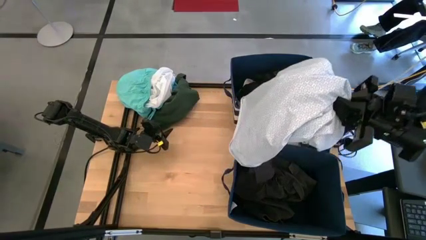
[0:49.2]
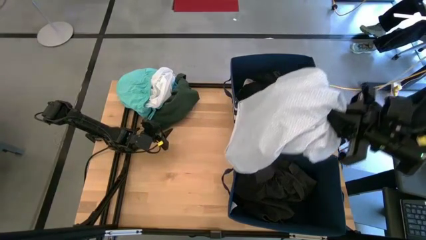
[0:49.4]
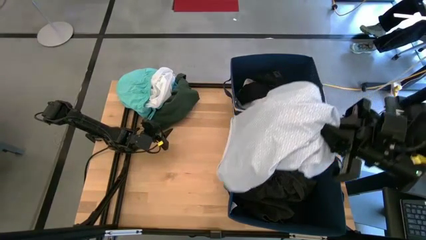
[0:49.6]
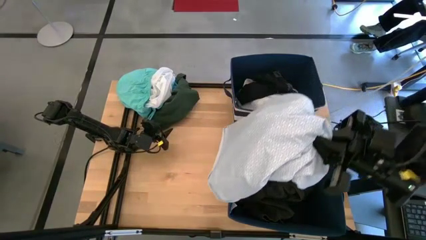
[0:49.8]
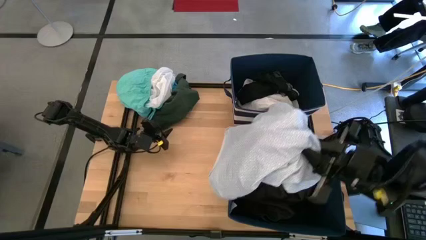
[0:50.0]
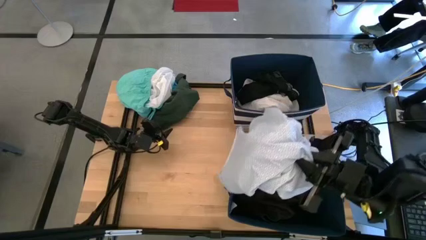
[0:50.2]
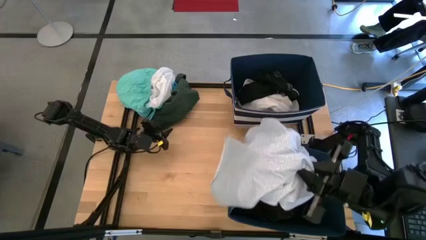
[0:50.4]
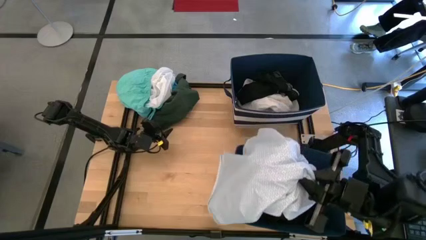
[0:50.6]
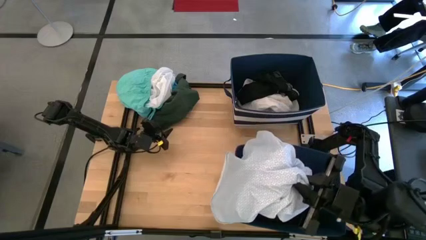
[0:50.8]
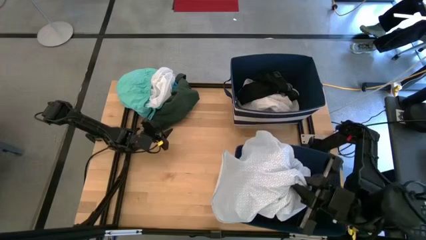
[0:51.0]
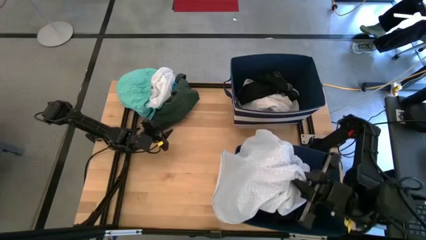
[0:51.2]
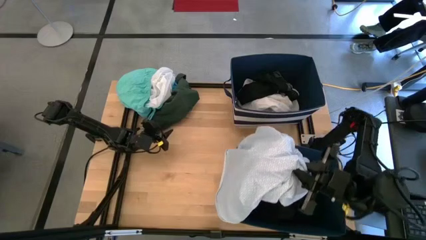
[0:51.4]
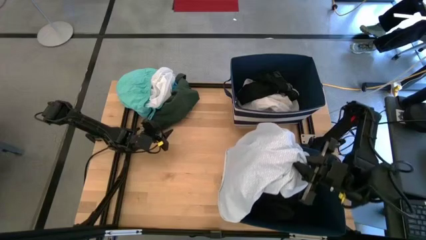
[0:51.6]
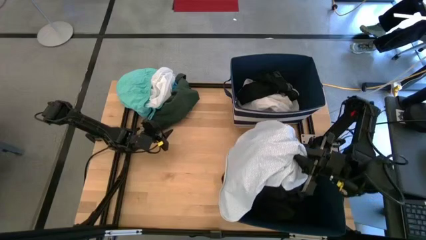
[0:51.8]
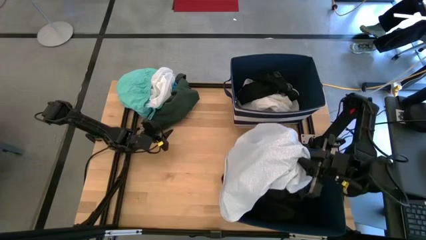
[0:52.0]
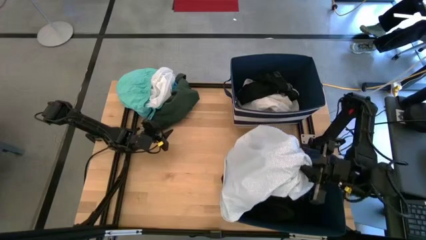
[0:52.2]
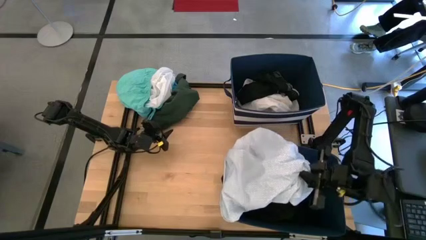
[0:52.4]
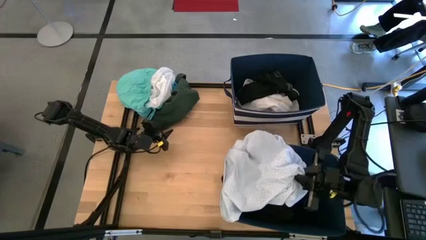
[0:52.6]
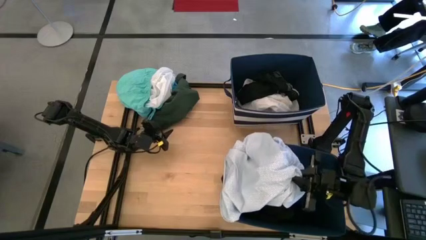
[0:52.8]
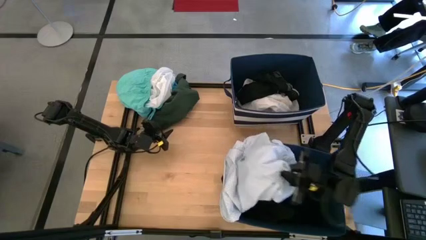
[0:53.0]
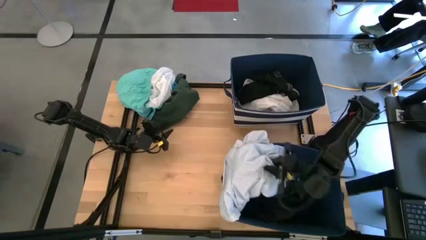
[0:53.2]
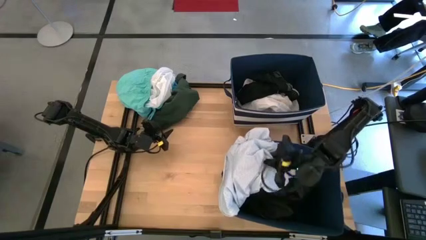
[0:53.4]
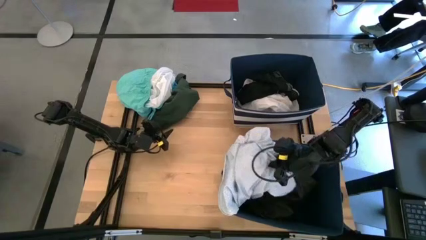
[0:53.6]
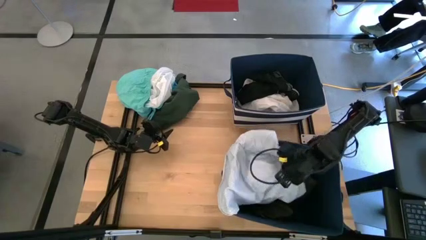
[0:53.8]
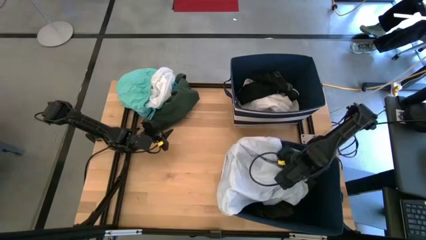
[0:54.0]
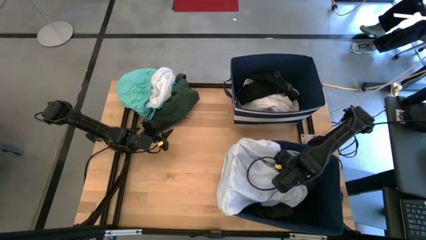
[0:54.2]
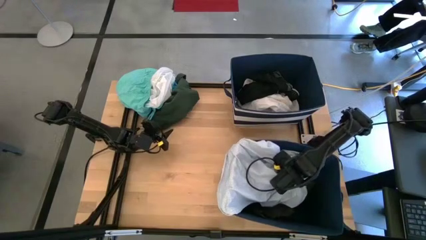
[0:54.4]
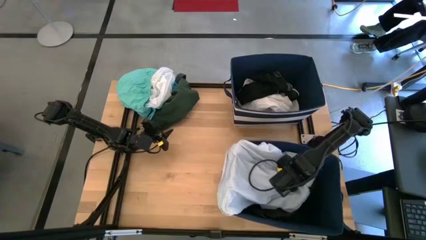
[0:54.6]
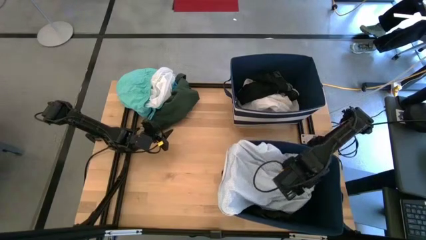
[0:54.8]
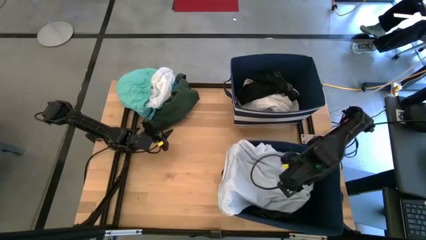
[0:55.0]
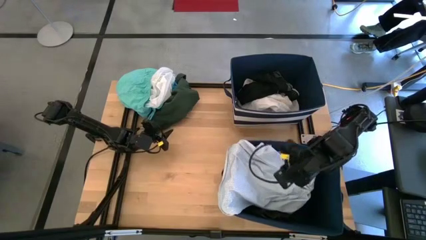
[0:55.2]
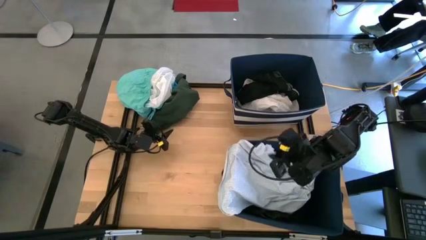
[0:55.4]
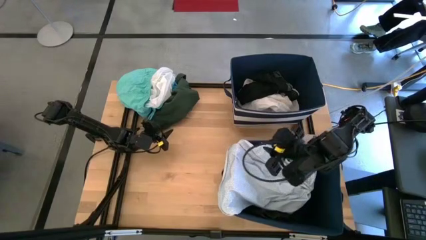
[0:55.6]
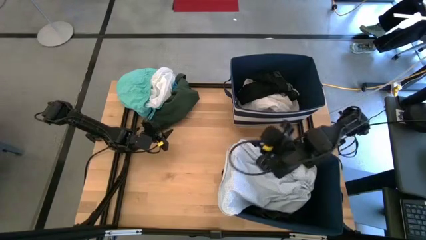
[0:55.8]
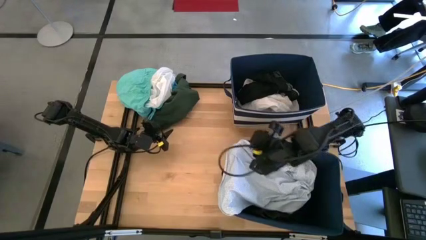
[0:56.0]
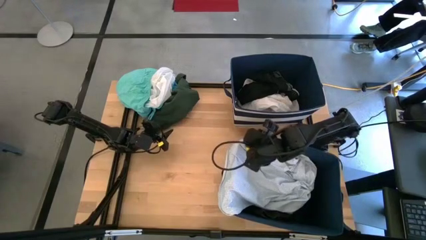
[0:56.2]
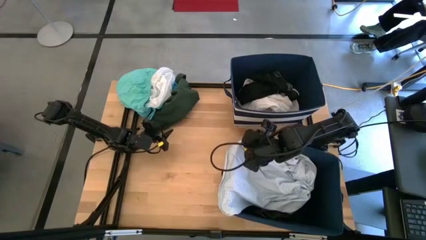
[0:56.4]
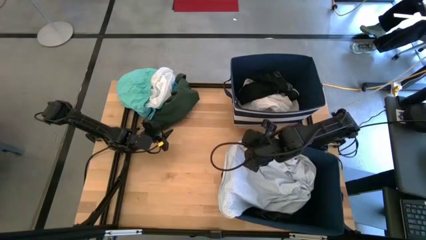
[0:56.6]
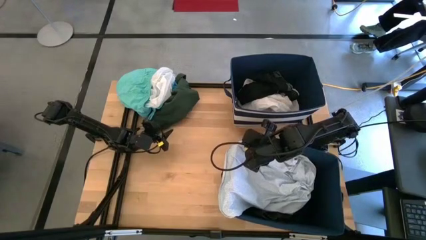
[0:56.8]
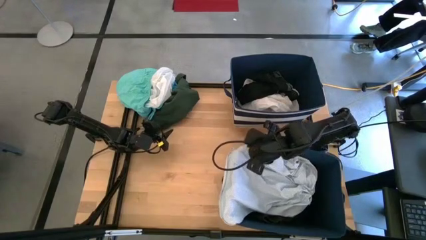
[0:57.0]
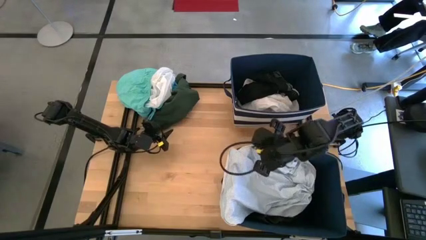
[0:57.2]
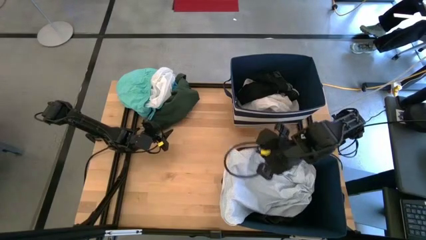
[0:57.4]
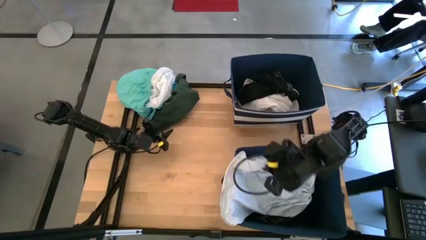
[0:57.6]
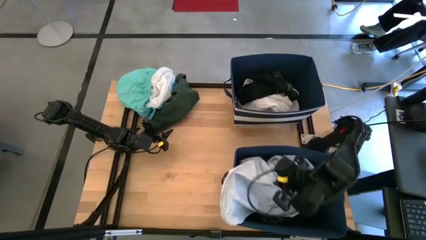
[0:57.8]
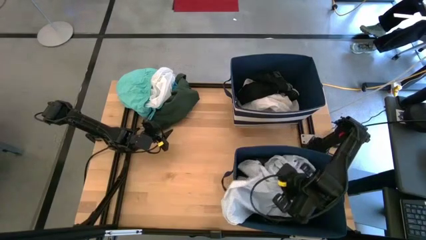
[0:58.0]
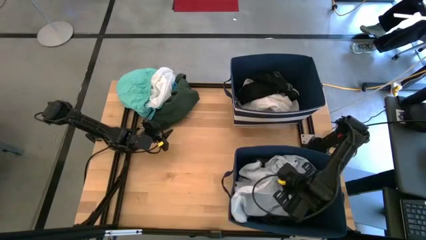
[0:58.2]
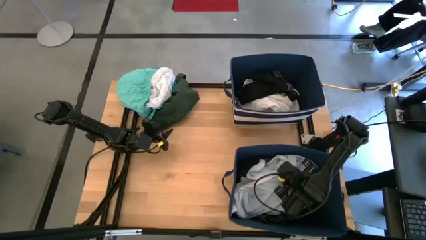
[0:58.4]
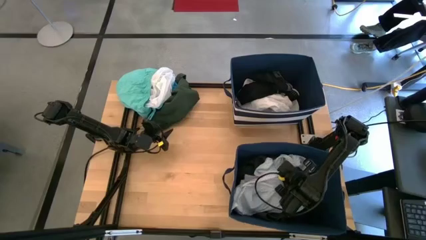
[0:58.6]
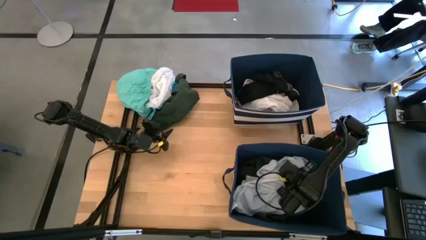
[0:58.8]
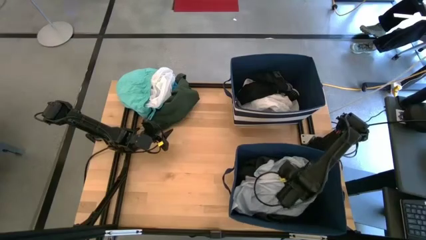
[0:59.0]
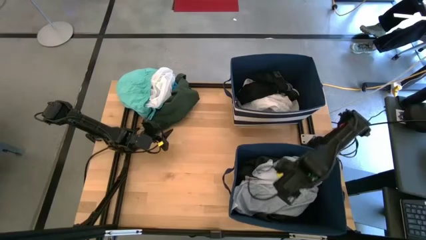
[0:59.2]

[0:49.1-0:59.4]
Task: Sort clothes
Put the blue patient gown into the bottom blue laundry organizer
